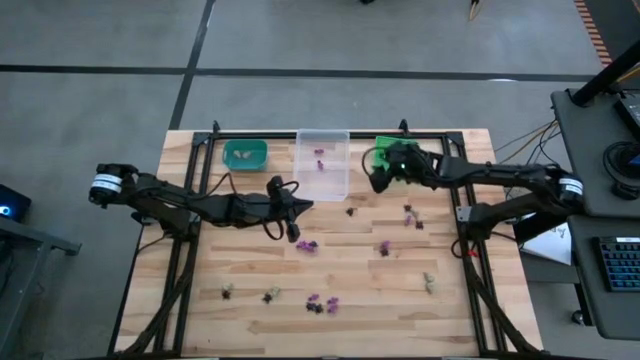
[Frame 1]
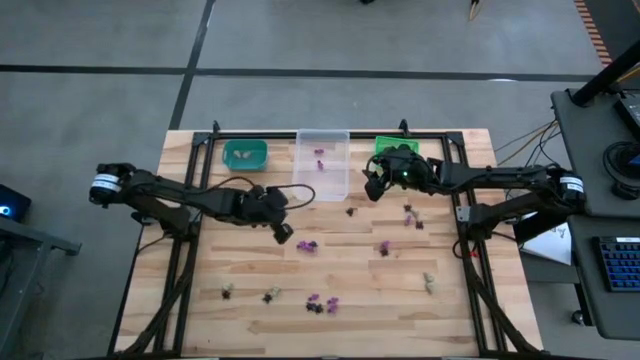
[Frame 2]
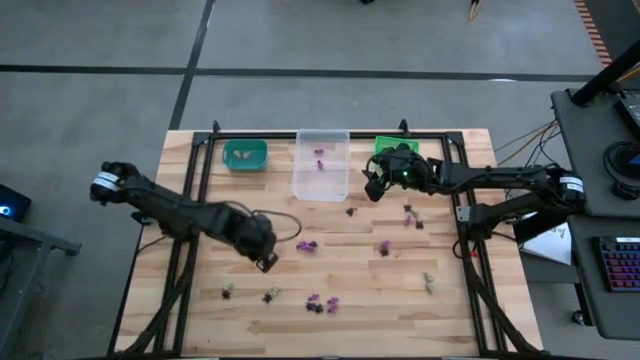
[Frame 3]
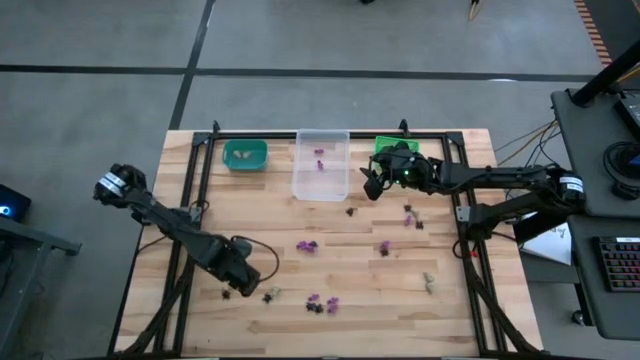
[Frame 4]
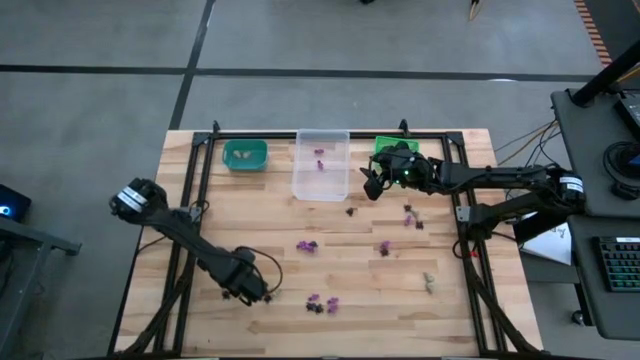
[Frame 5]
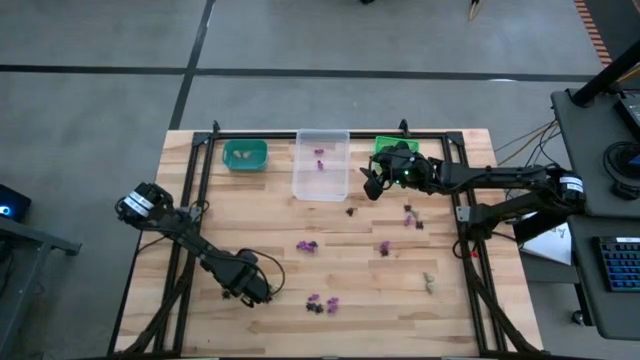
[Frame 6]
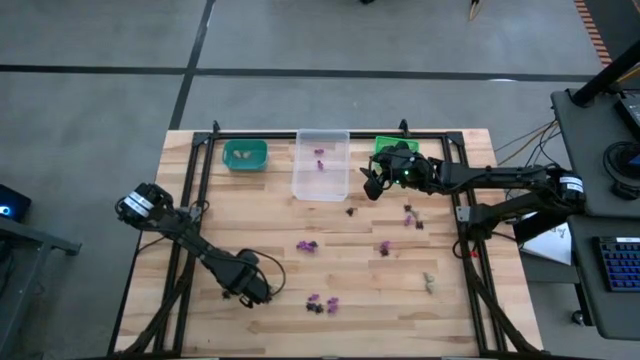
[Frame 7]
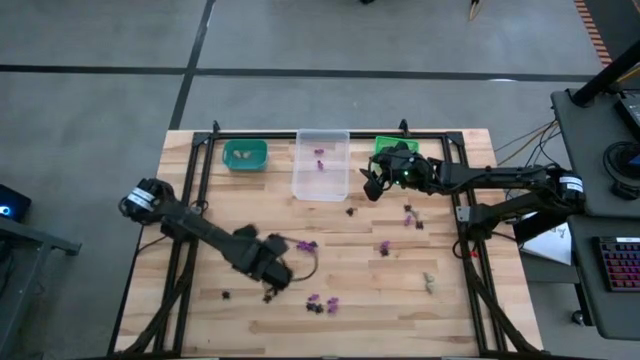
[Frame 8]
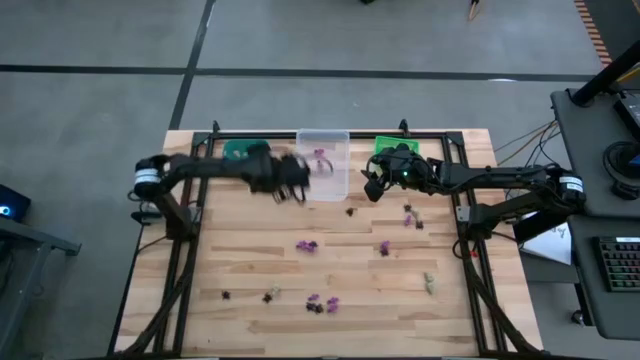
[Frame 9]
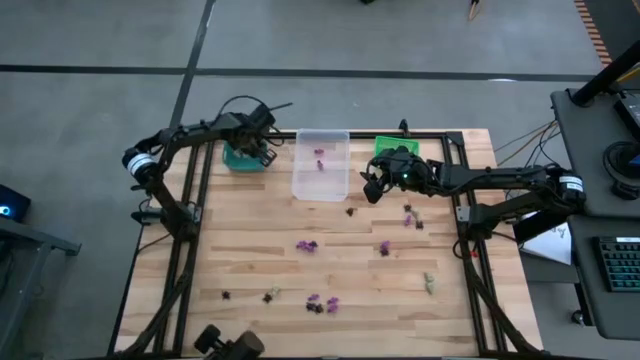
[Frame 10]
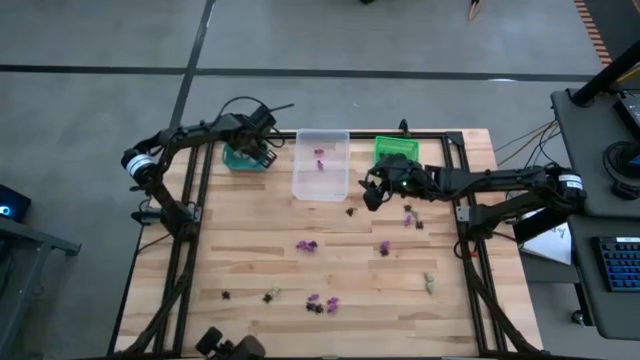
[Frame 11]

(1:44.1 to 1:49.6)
Task: Sort Halloween decoration
Put the white skull toy into the light blue bin

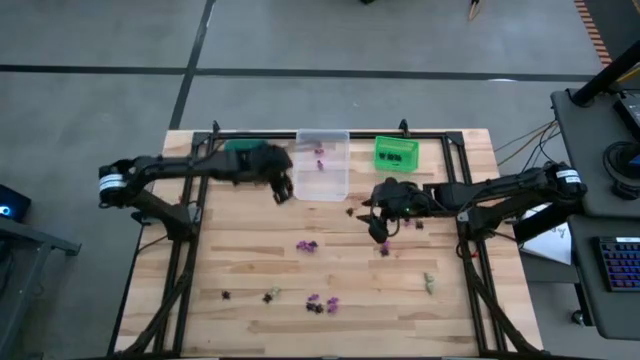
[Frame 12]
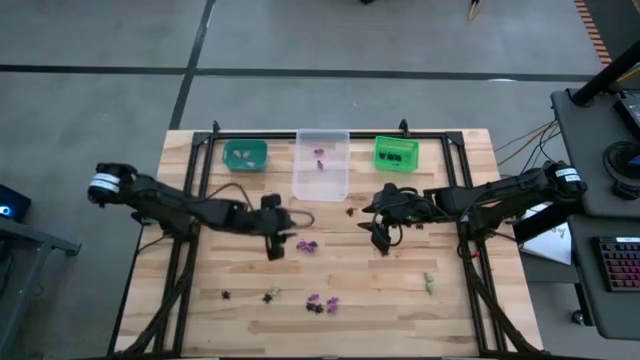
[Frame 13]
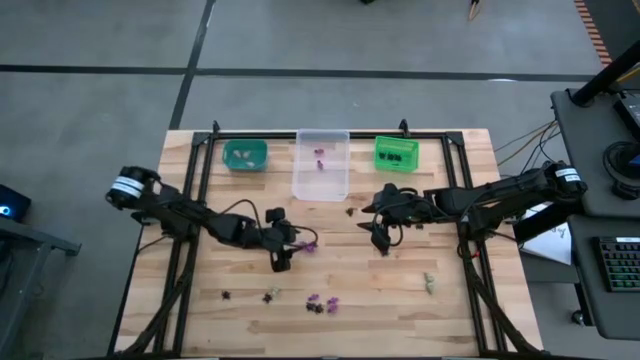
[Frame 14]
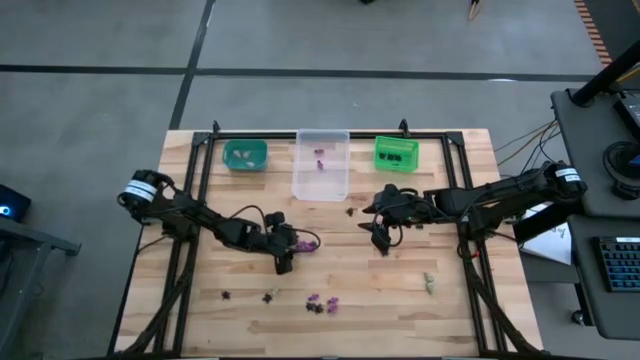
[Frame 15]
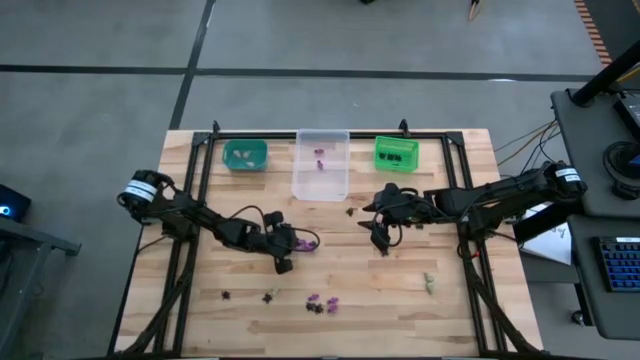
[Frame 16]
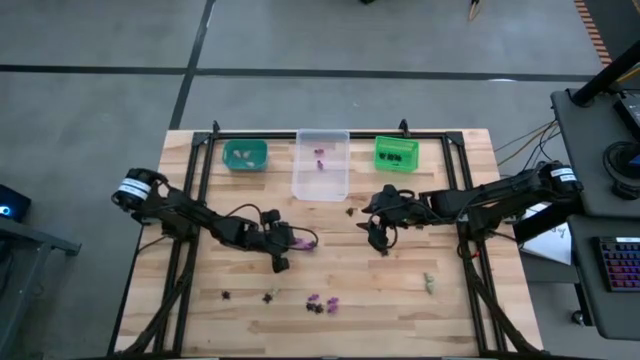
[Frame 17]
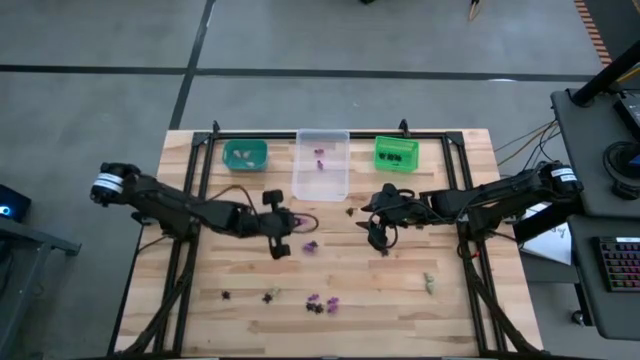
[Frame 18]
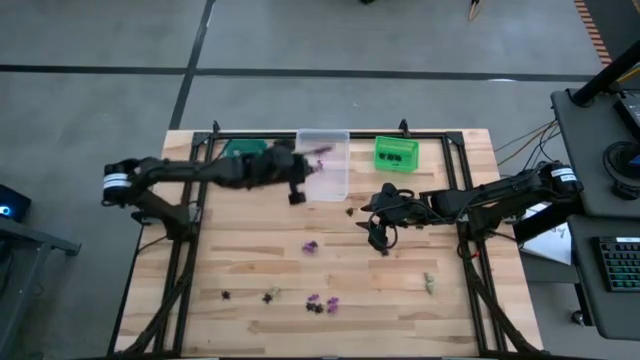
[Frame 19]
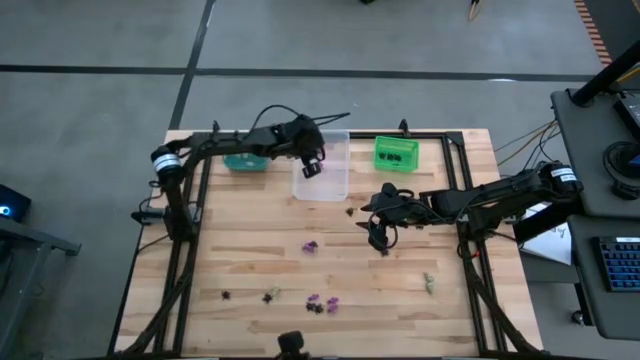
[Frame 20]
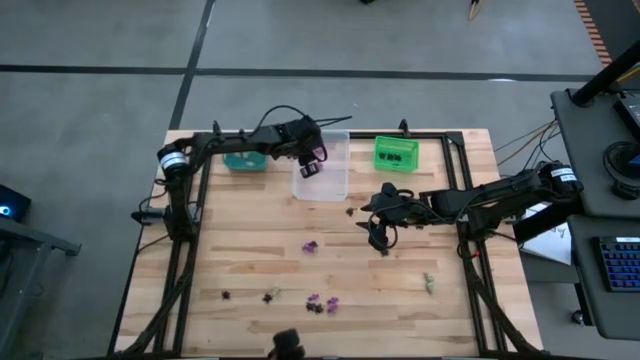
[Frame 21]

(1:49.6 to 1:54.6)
Put the violet skeleton toy into the transparent bin

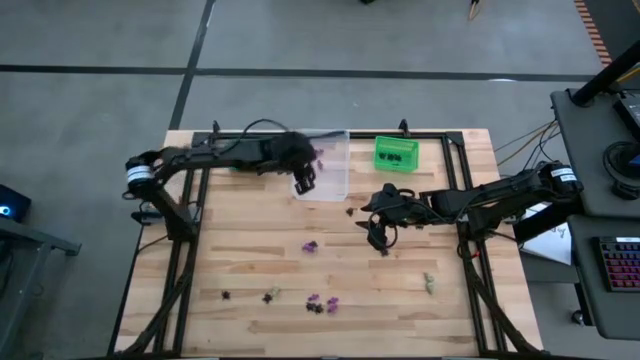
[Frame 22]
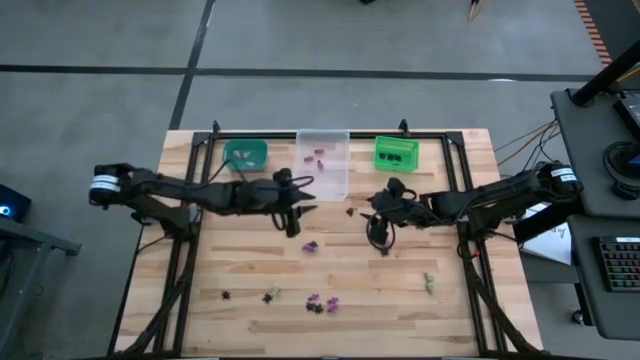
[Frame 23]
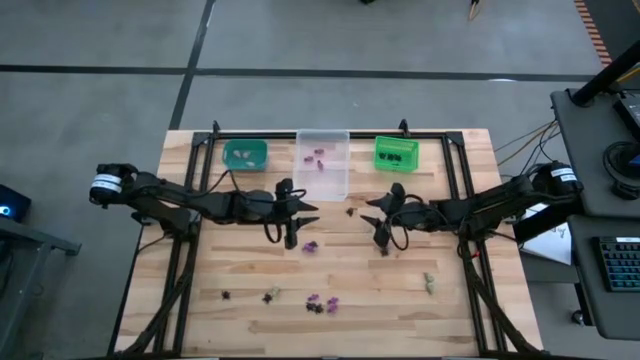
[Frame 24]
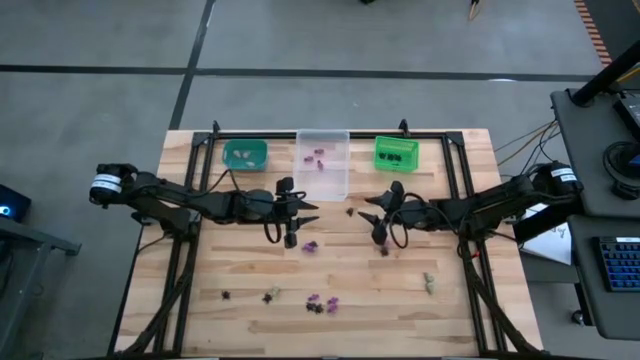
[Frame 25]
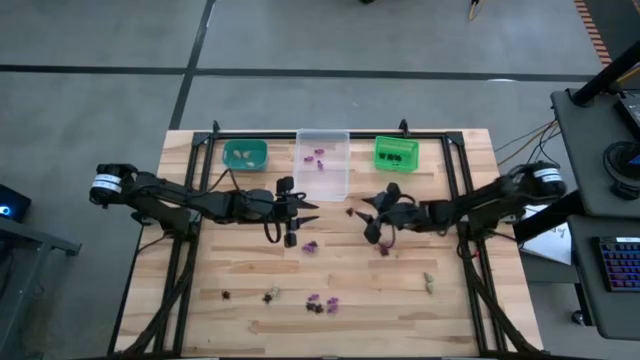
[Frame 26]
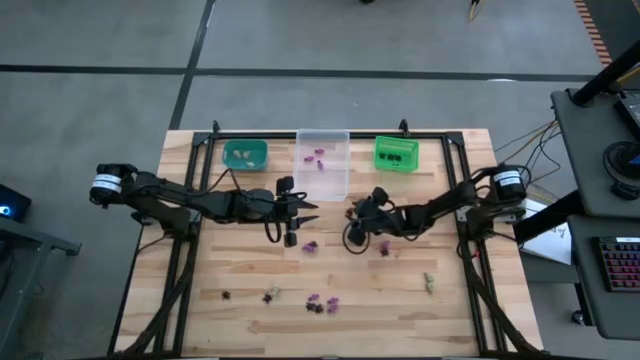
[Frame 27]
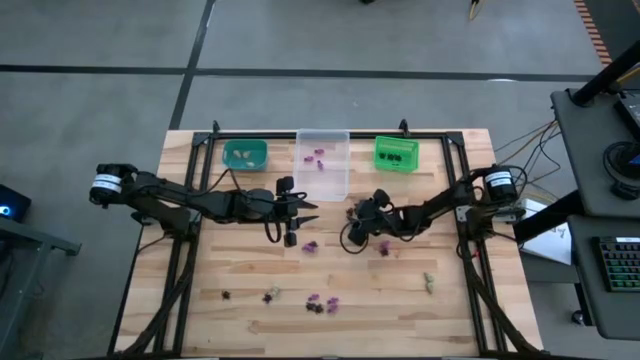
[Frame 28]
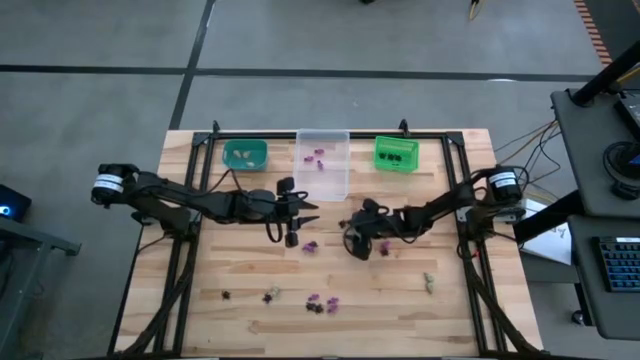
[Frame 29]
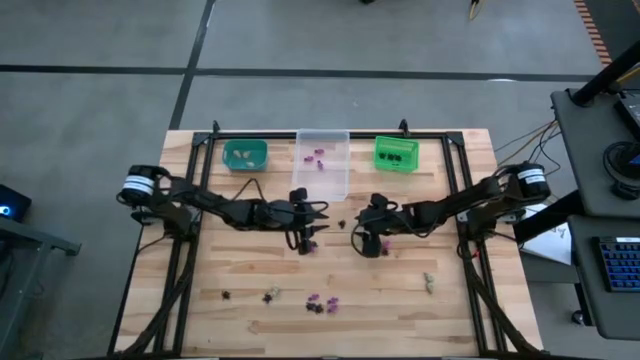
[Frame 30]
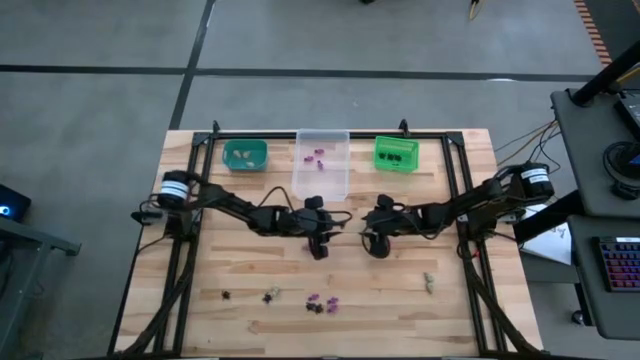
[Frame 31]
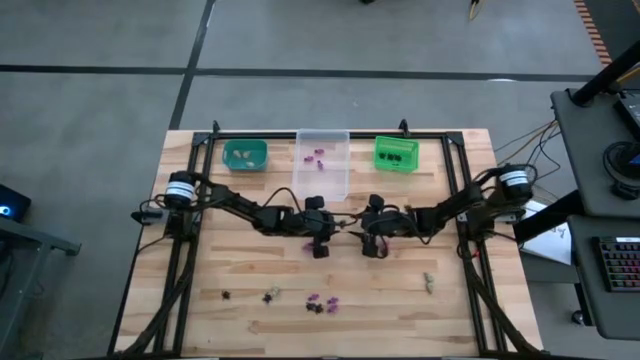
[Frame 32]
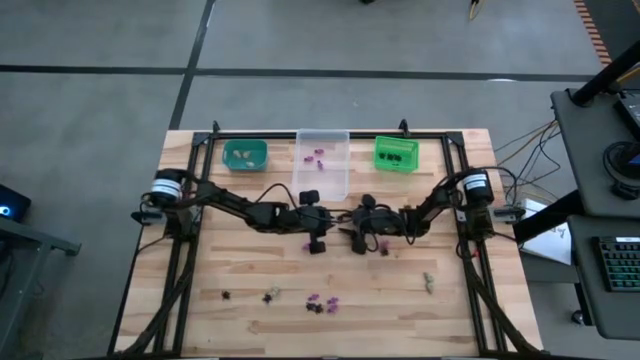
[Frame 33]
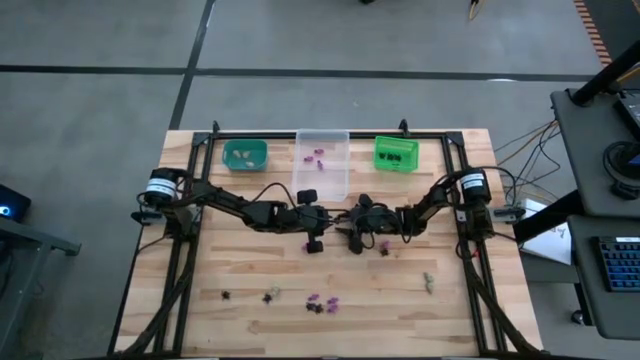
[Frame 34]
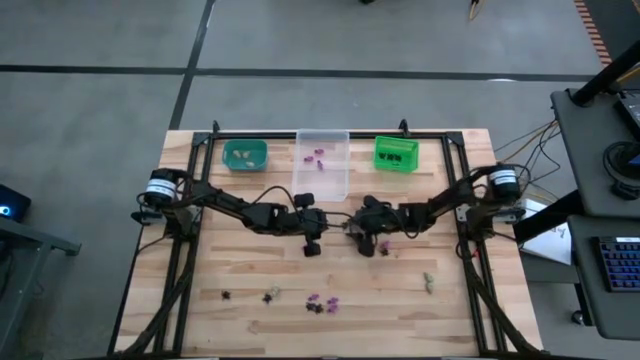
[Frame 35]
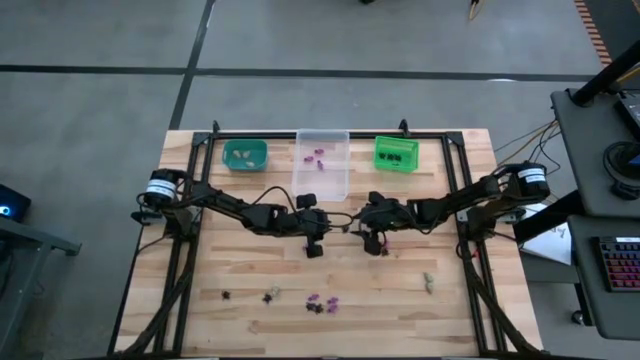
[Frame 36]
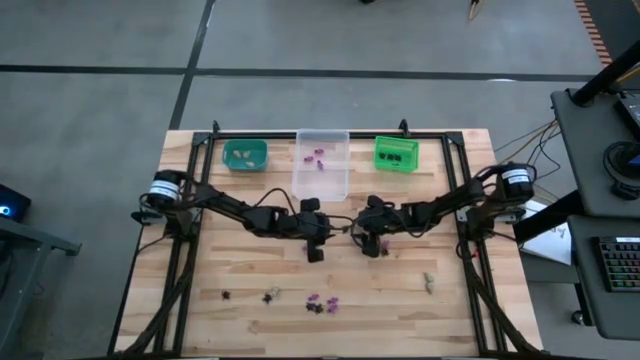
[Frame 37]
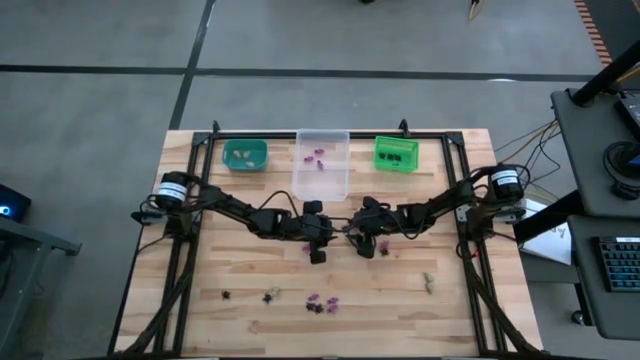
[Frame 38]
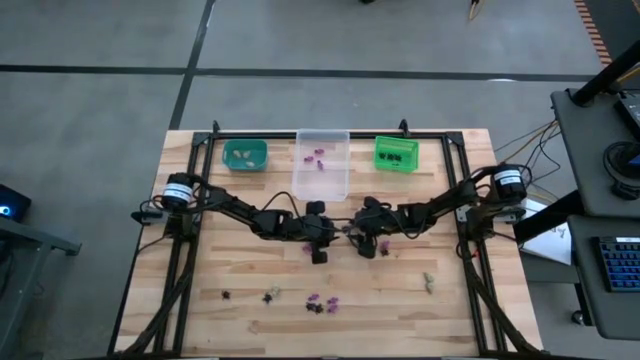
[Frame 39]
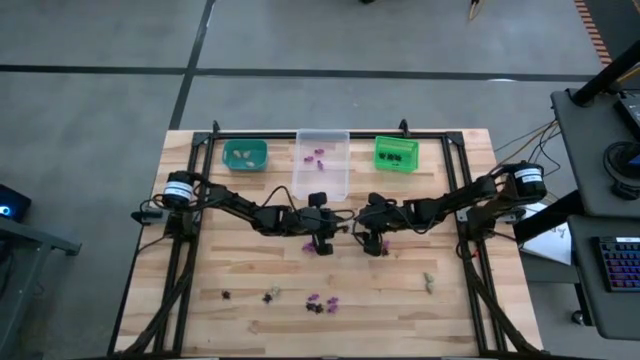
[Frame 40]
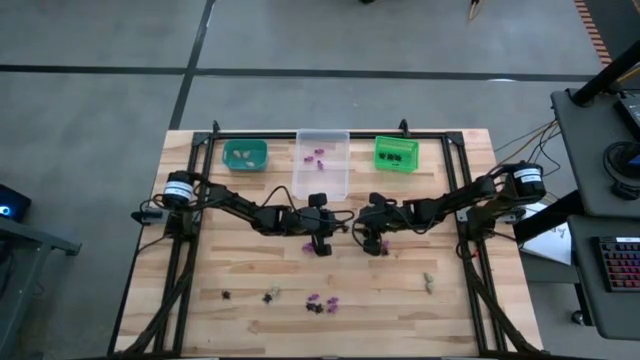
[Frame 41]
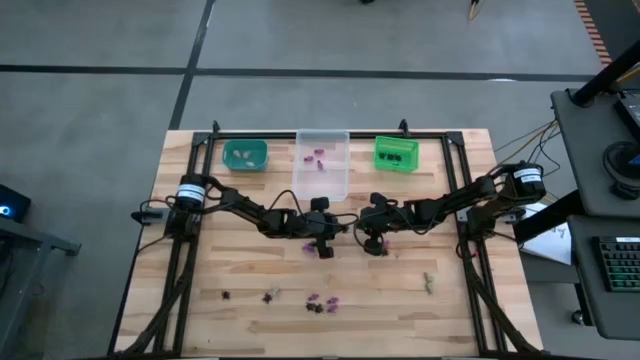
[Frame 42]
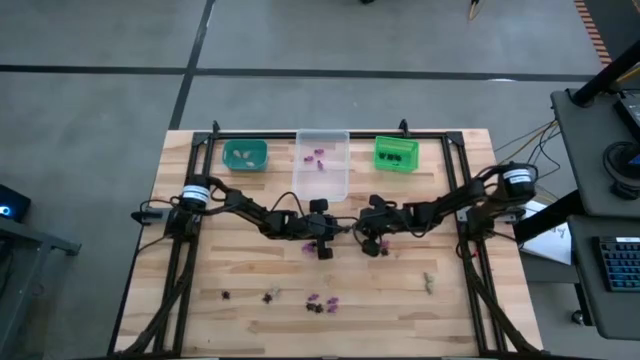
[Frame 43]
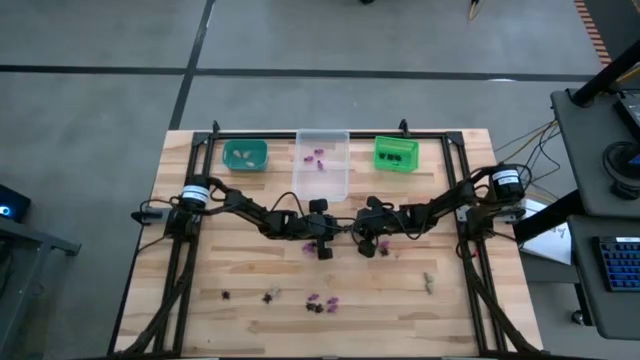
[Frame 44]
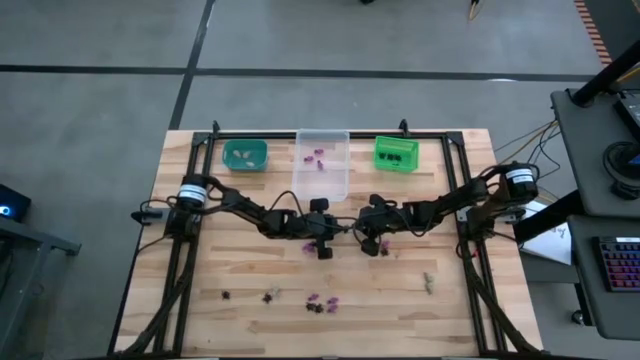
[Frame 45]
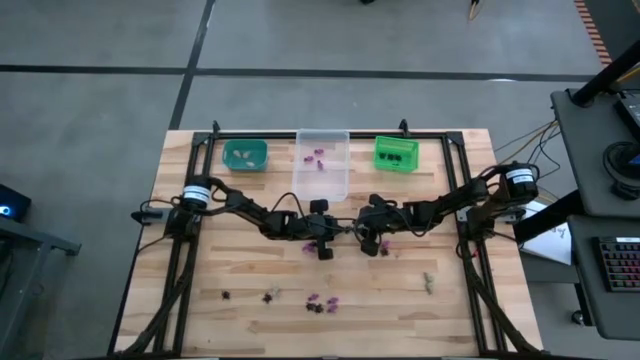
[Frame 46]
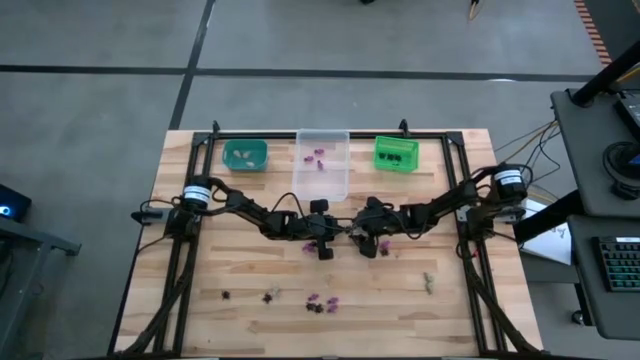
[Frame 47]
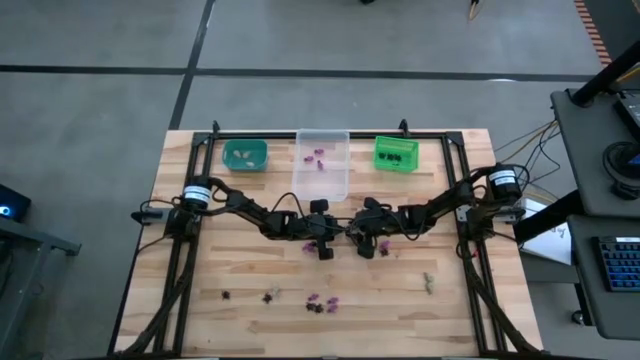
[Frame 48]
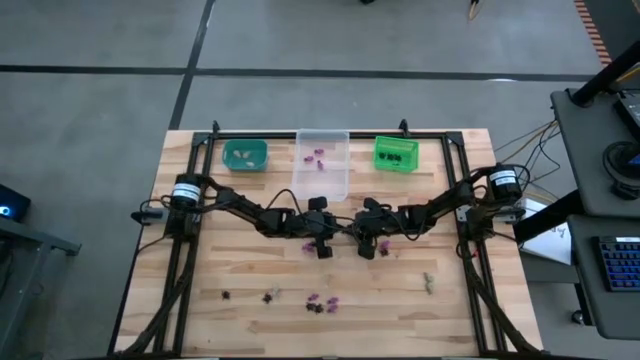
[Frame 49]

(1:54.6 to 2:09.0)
Put the black spider toy into the green bin
